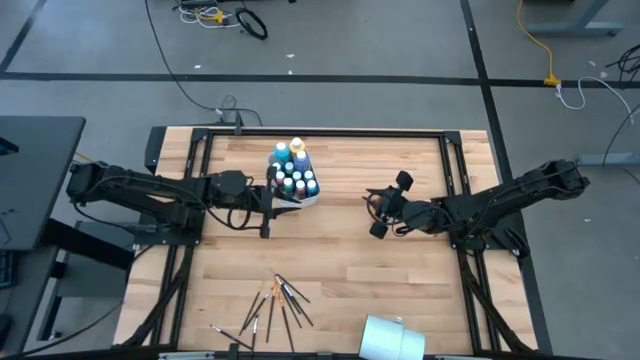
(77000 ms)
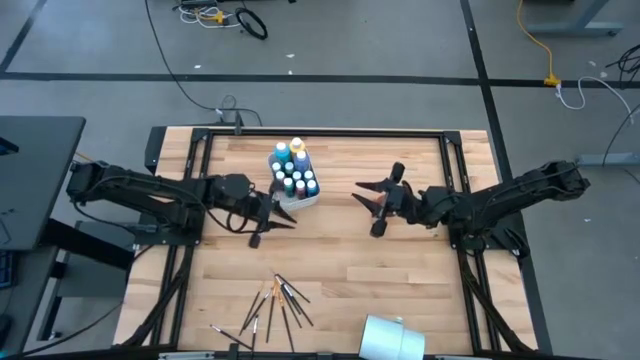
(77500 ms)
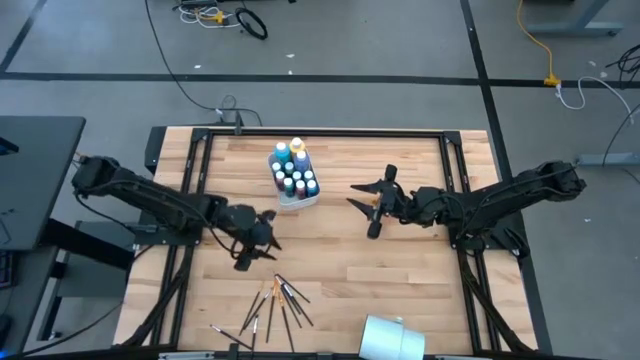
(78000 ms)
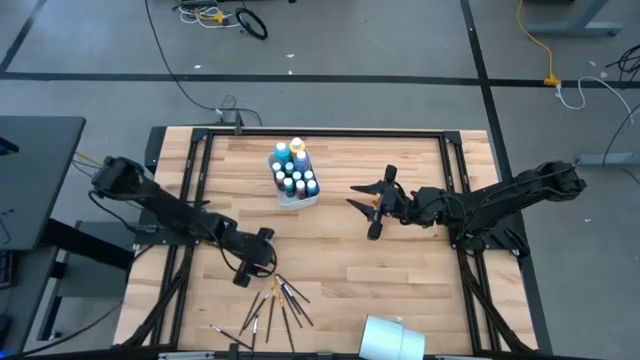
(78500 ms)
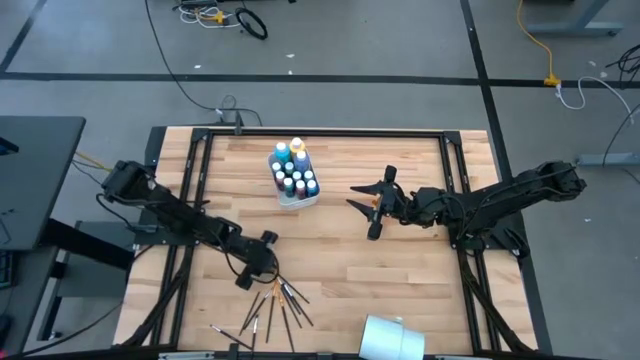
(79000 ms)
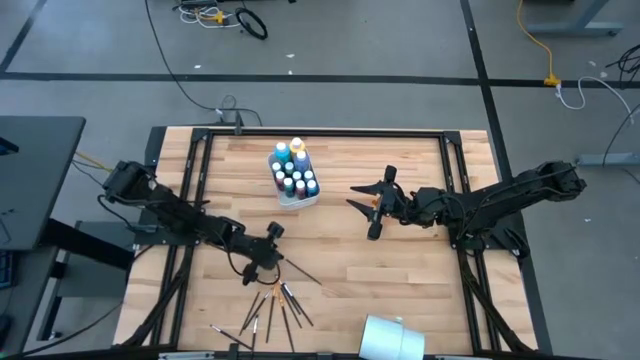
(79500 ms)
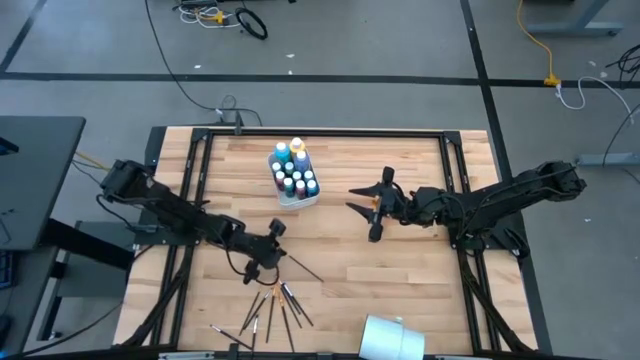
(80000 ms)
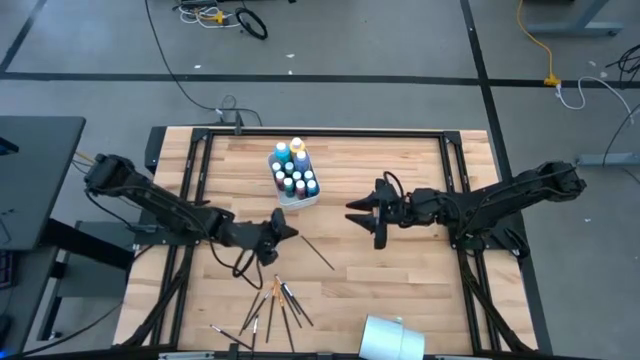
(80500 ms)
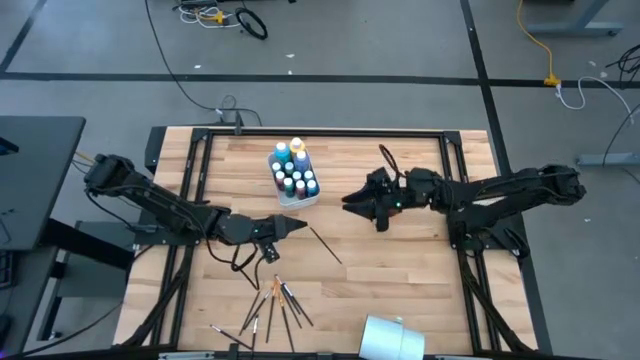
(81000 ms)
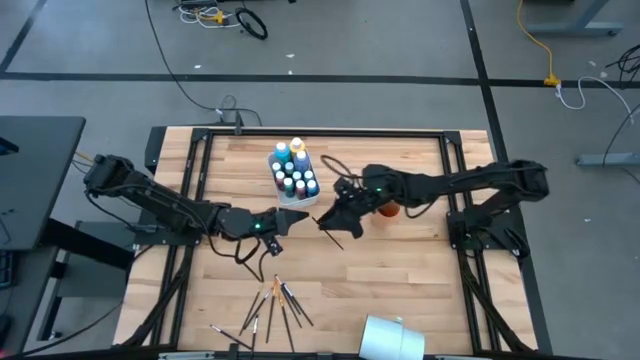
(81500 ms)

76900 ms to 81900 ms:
Task: Pick & Place Paint Supplies
Put the gold paint brush into the orange cup

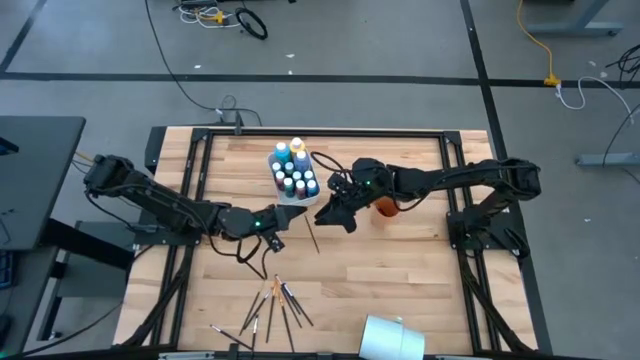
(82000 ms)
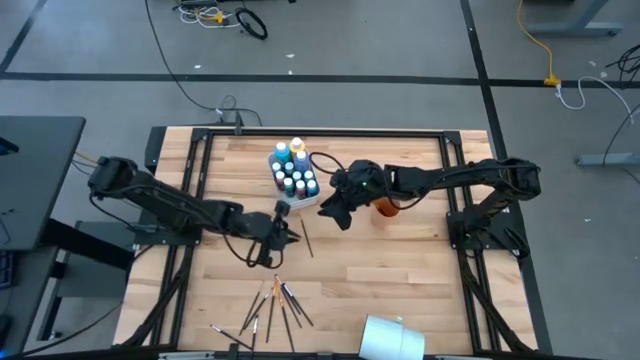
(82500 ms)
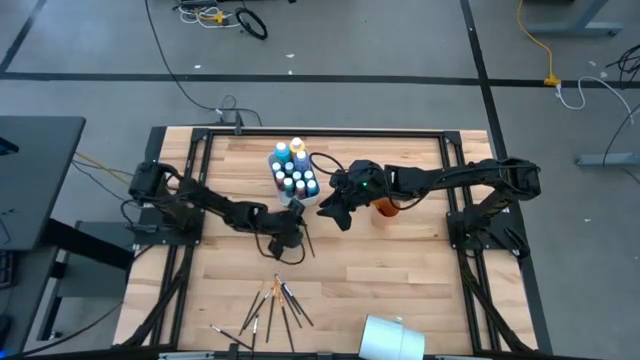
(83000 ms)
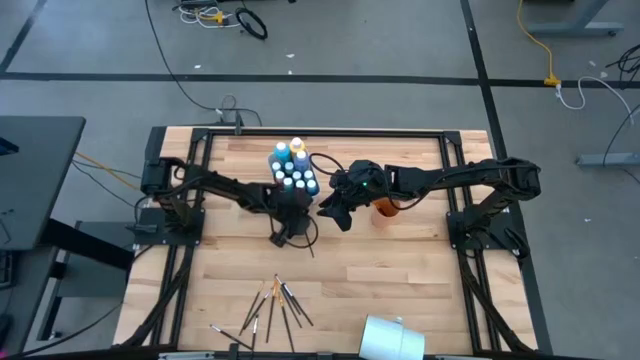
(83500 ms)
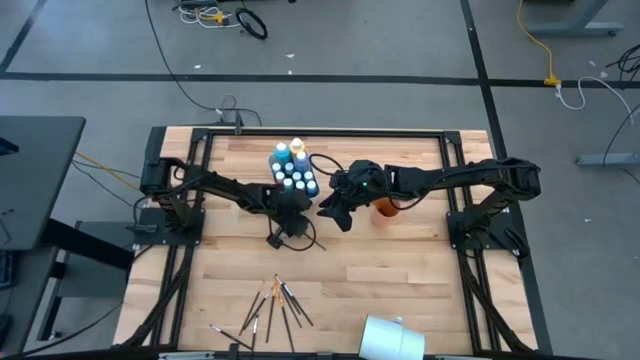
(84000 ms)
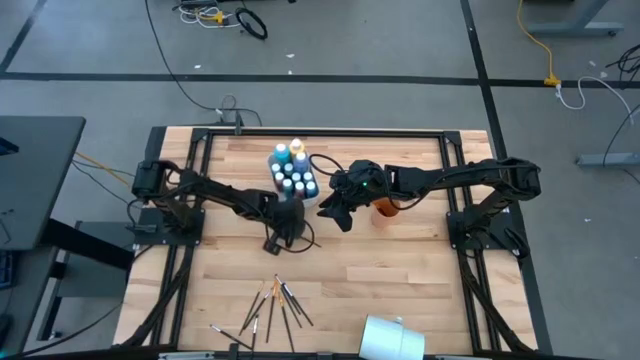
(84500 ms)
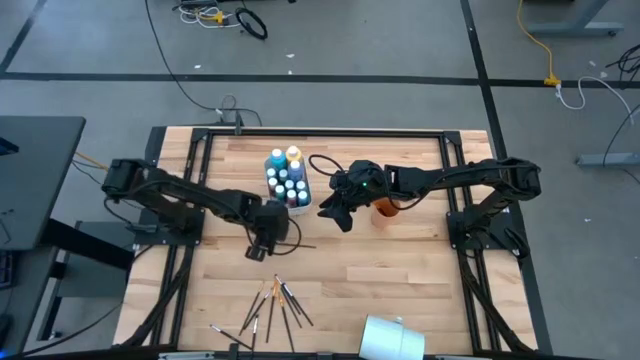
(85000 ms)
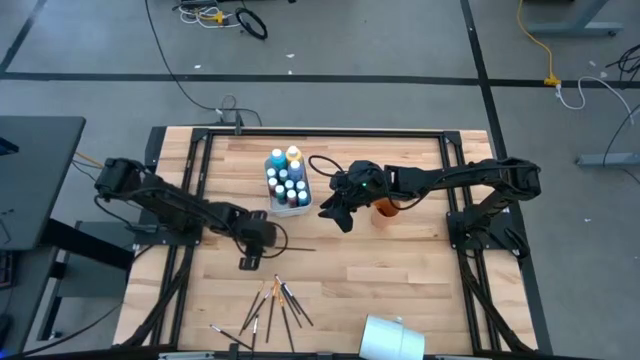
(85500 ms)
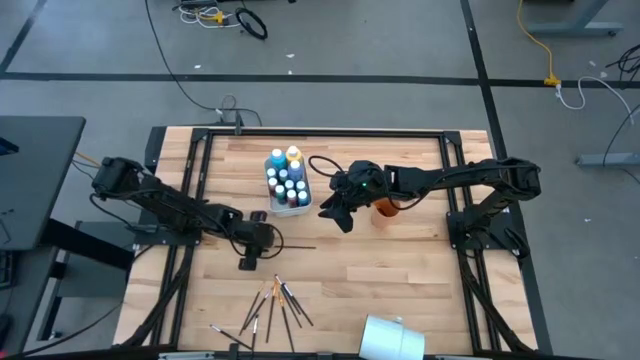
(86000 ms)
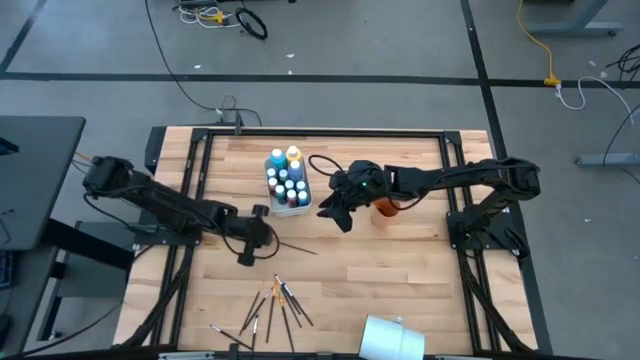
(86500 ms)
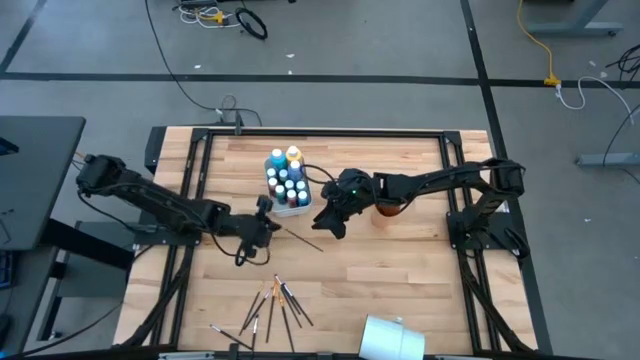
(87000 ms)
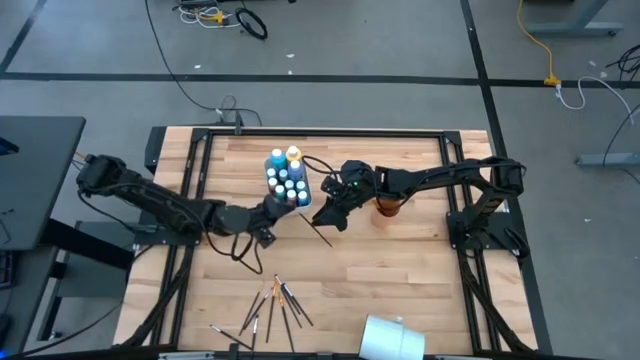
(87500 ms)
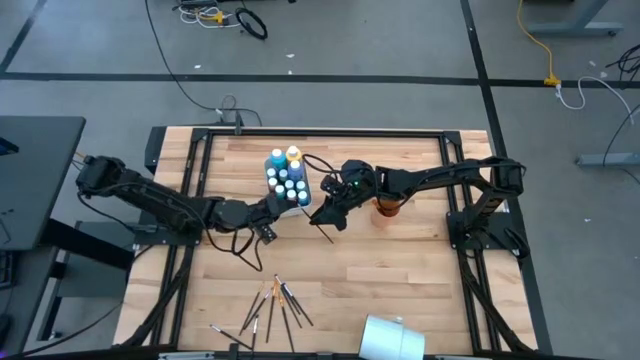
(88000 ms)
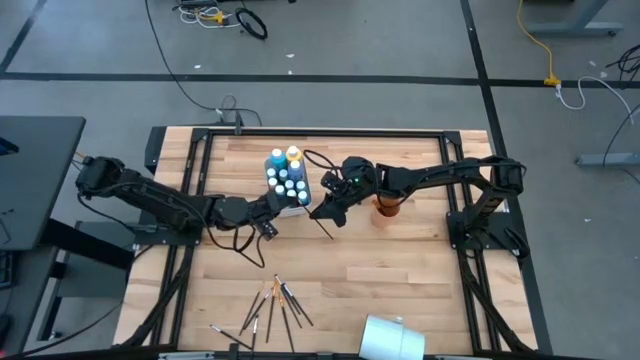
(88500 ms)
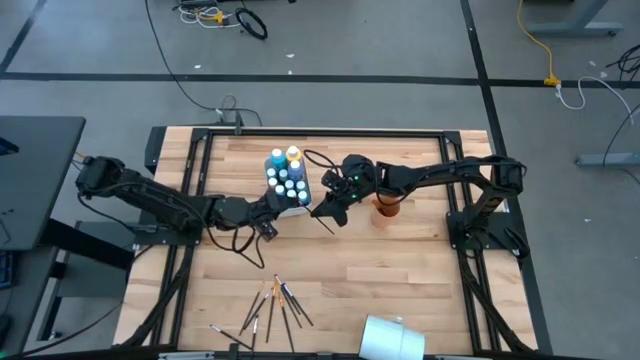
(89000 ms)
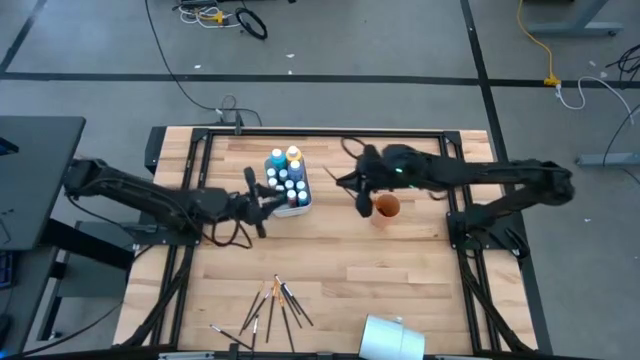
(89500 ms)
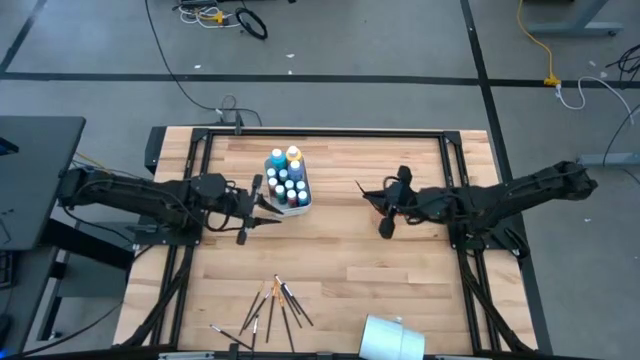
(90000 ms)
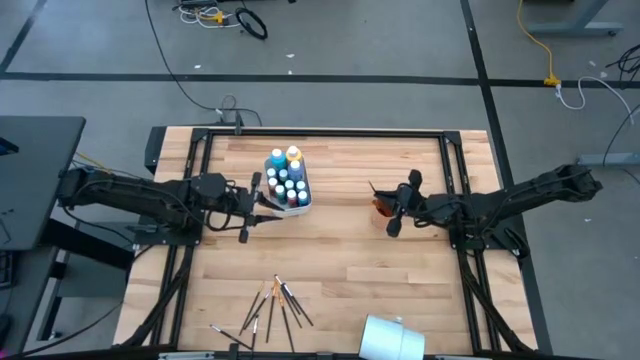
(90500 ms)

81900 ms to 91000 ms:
Put the gold paint brush into the orange cup

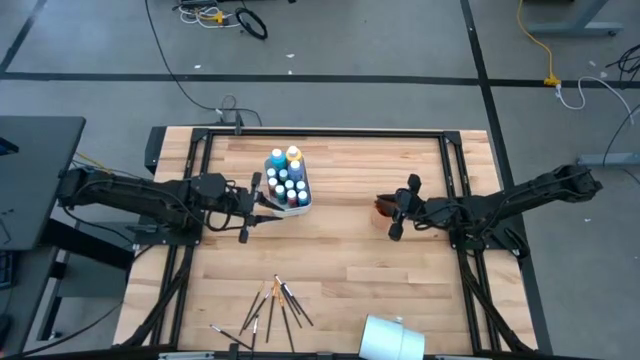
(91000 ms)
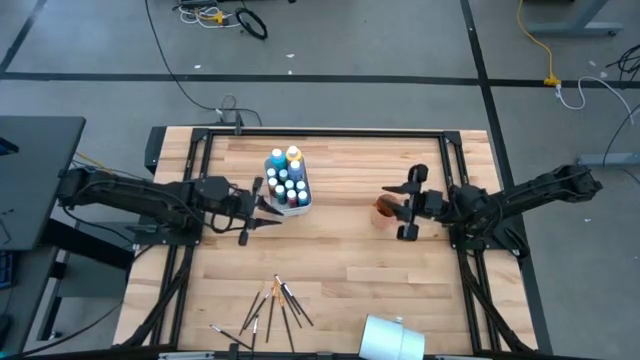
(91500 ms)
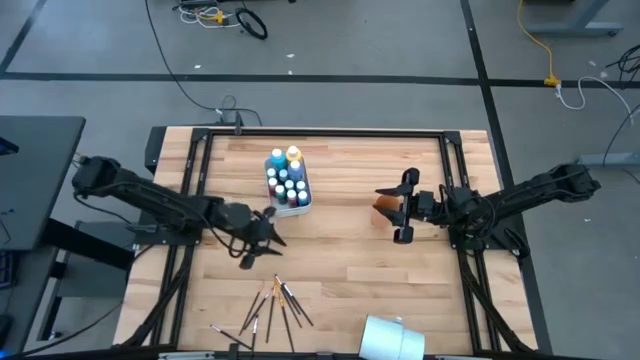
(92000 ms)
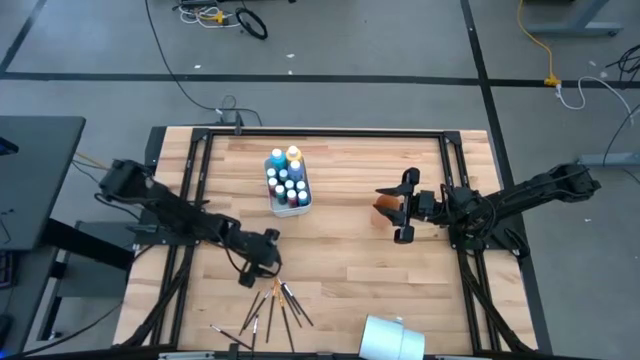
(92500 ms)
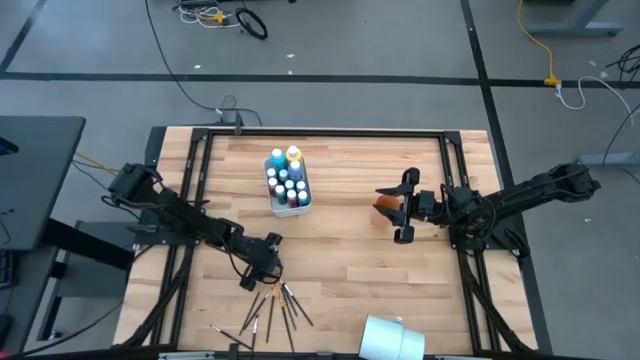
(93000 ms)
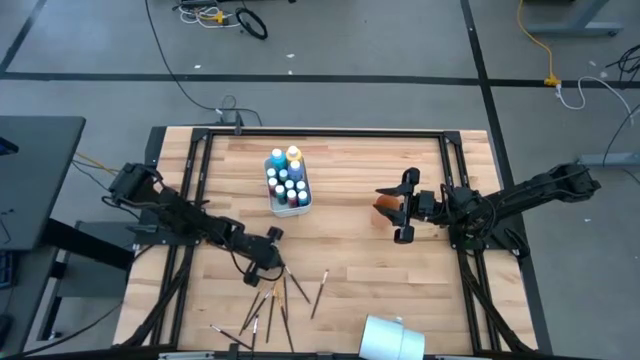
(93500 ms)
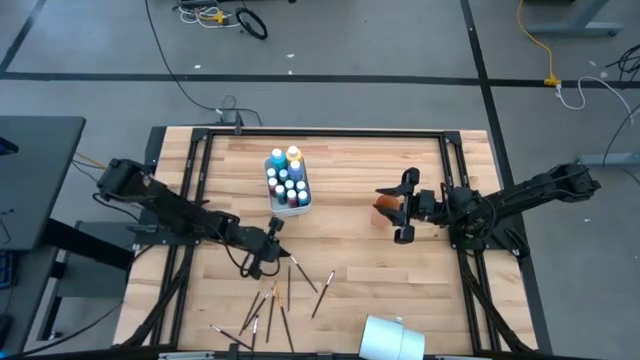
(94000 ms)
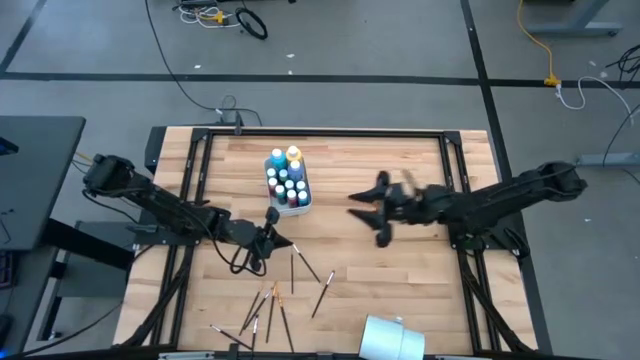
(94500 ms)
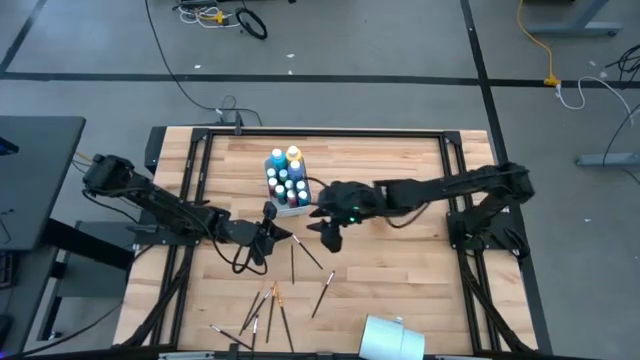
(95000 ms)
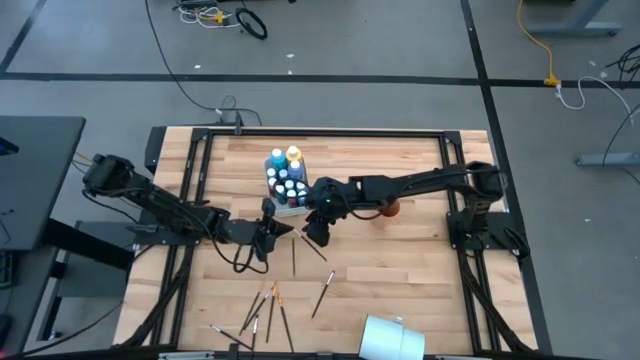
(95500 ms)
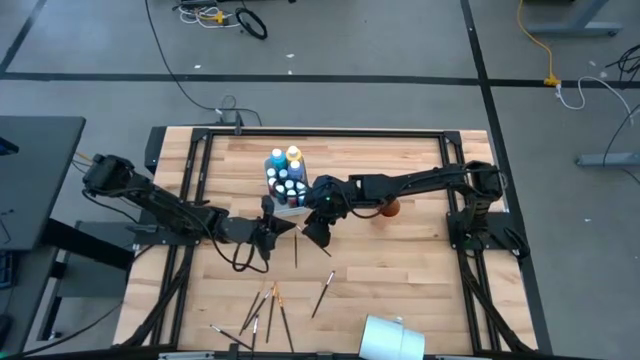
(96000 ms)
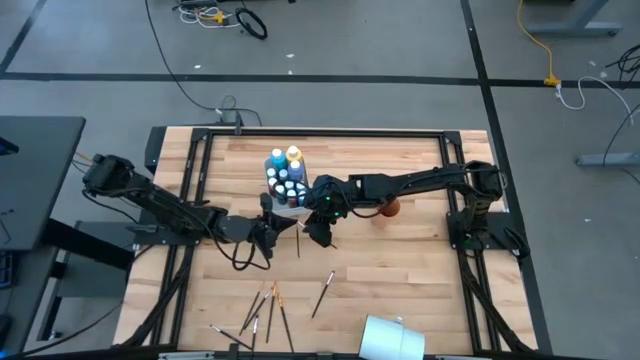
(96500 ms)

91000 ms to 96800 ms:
Put the silver paint brush into the orange cup

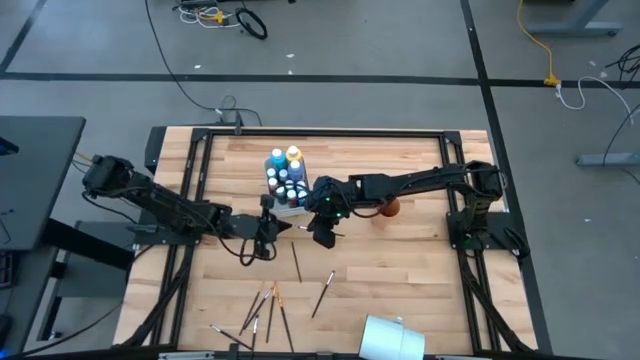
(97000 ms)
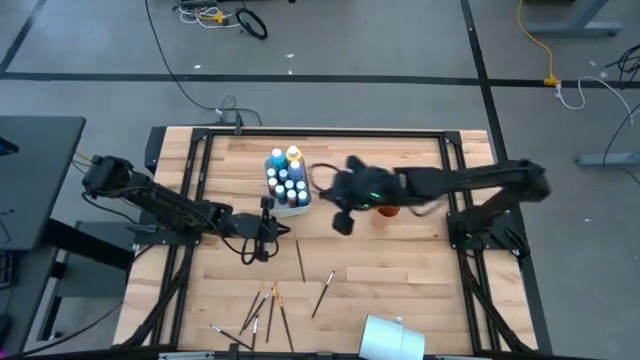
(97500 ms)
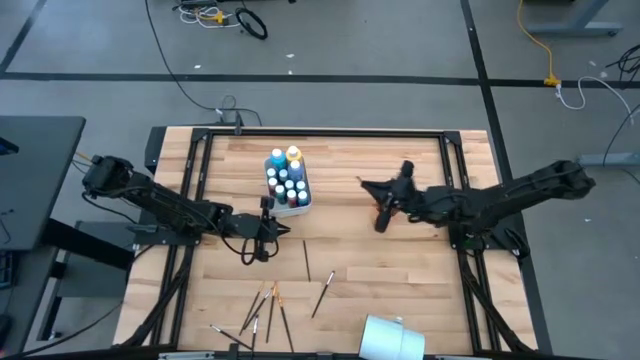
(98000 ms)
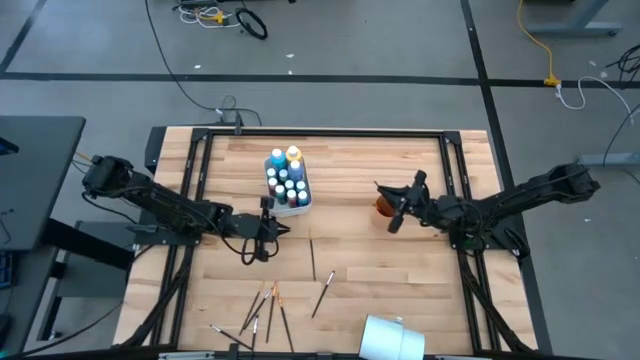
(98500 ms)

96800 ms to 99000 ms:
Put the silver paint brush into the orange cup
